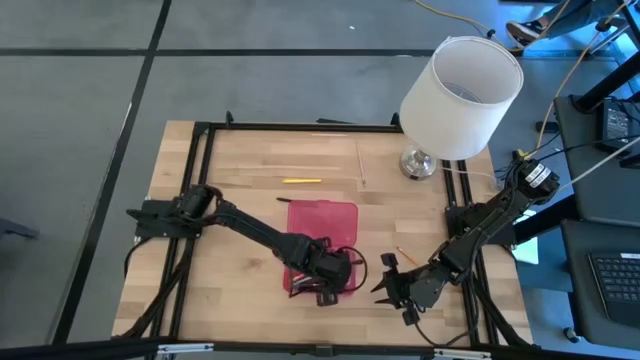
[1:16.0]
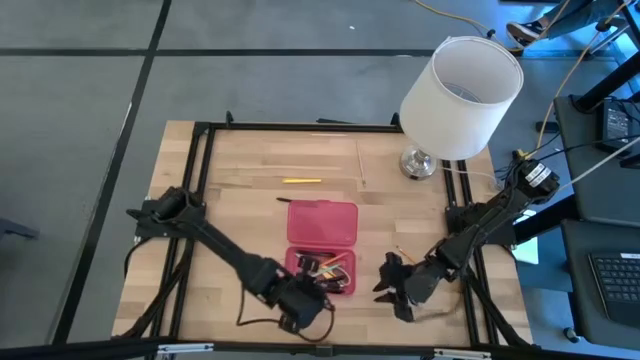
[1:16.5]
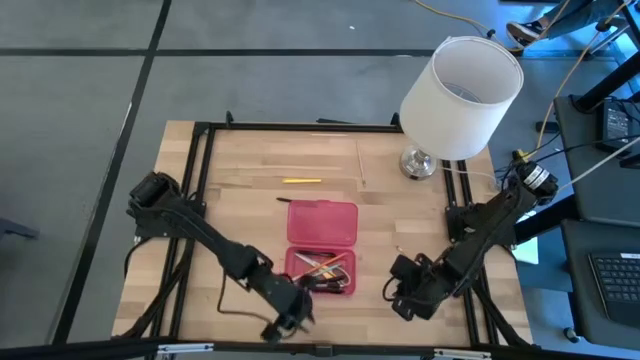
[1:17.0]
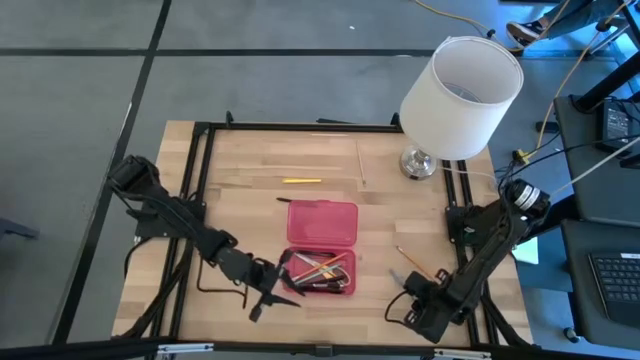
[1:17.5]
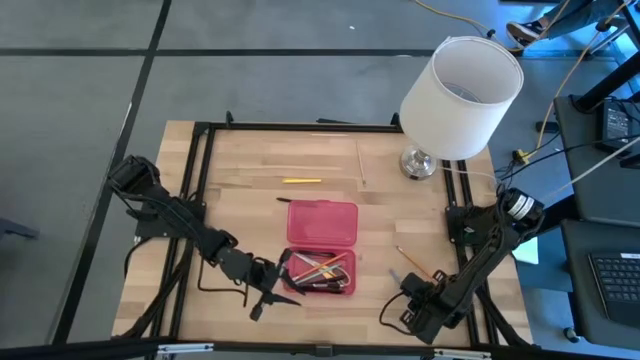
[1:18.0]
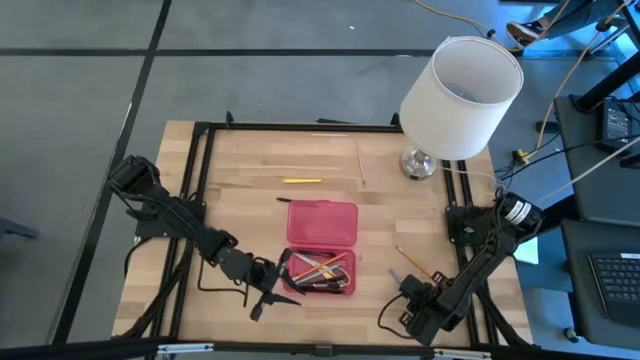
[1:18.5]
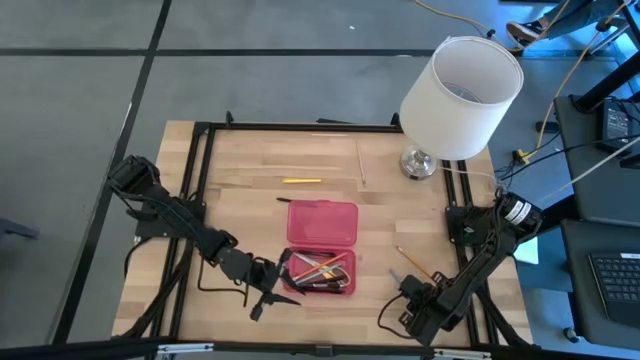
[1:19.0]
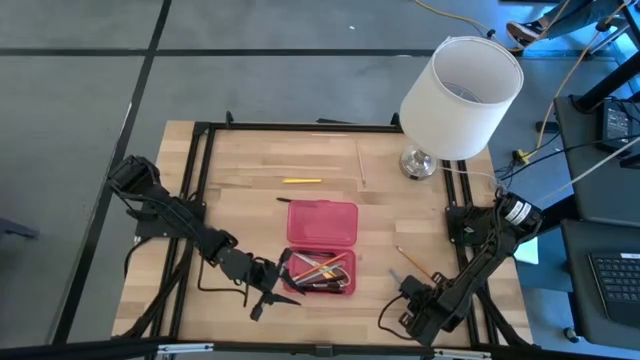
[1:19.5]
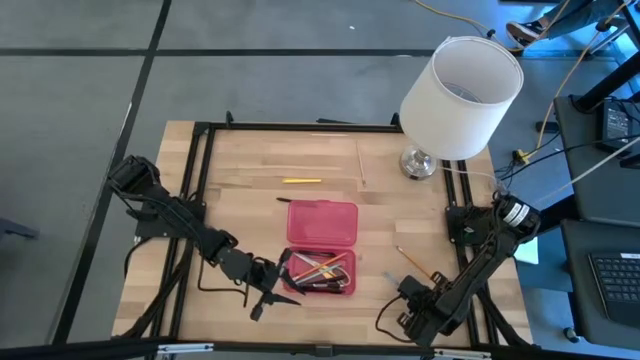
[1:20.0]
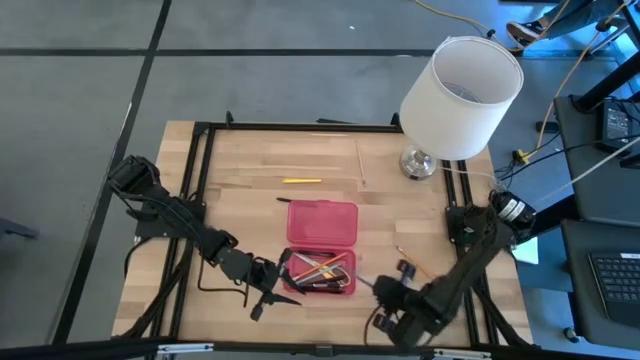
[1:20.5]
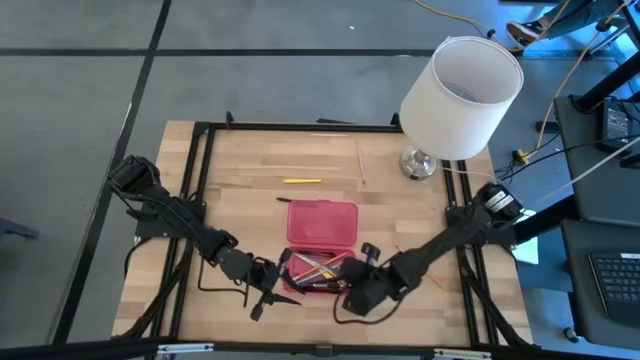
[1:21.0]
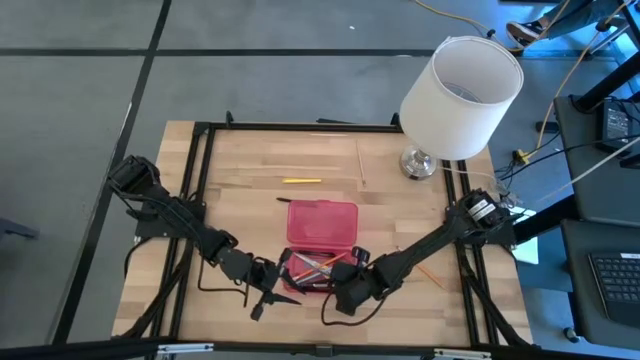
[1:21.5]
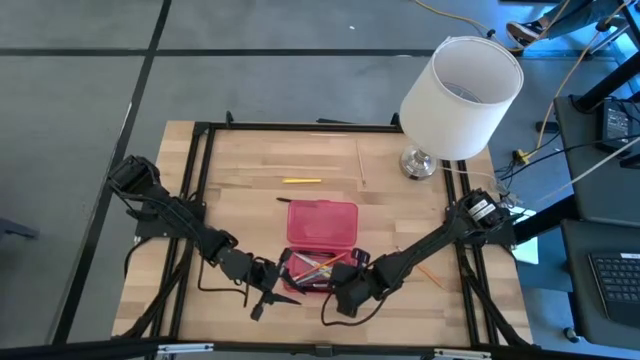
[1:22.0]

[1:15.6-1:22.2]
Task: Pick & place school supplies into a supply box
Put the blue pen into the red supply box

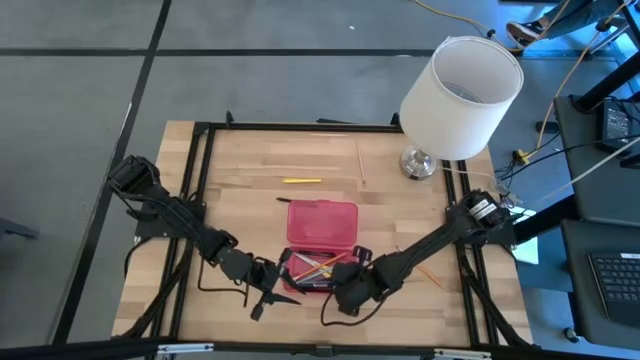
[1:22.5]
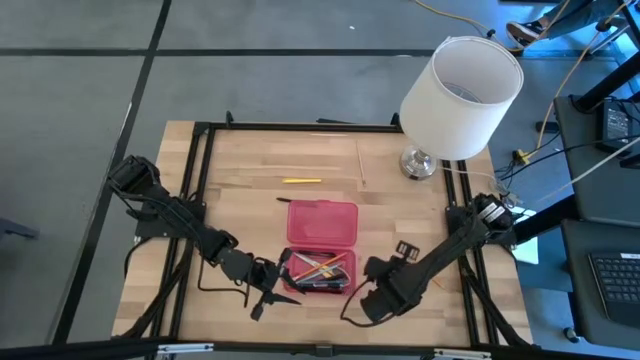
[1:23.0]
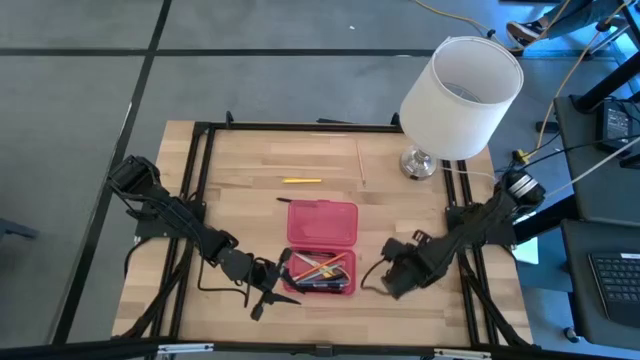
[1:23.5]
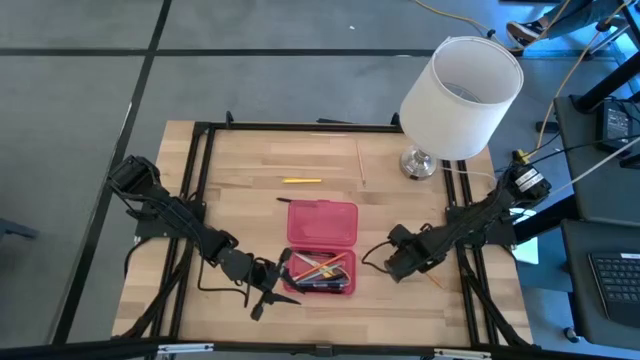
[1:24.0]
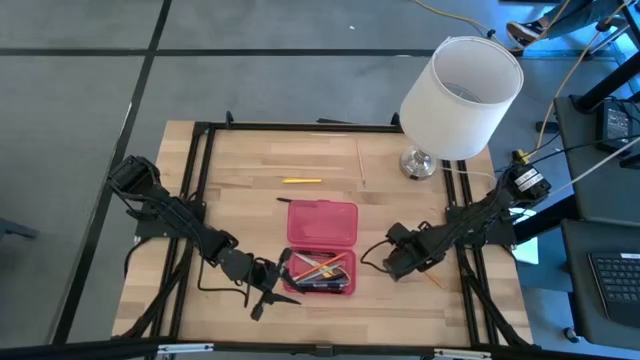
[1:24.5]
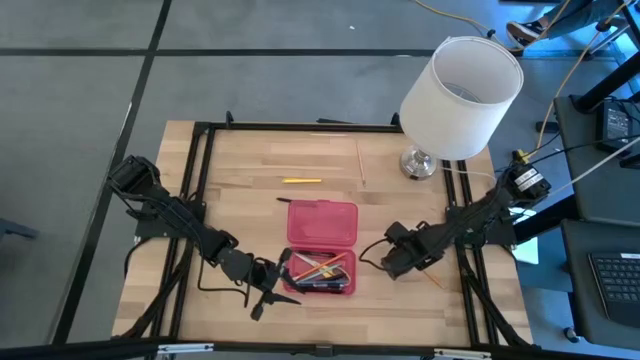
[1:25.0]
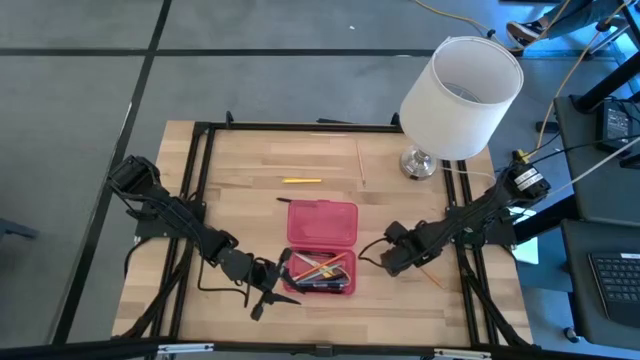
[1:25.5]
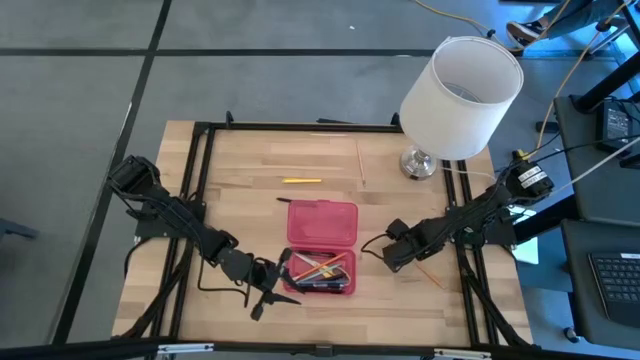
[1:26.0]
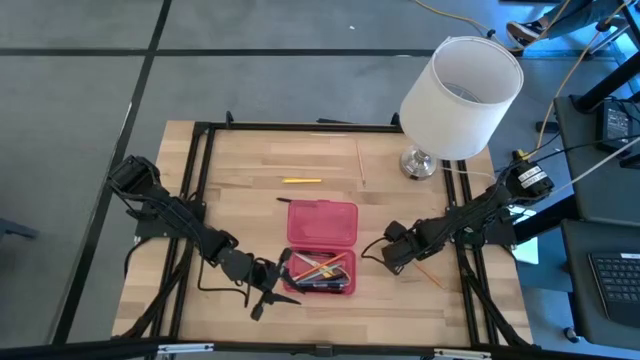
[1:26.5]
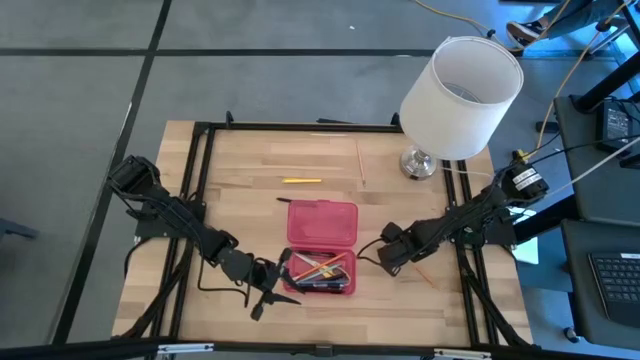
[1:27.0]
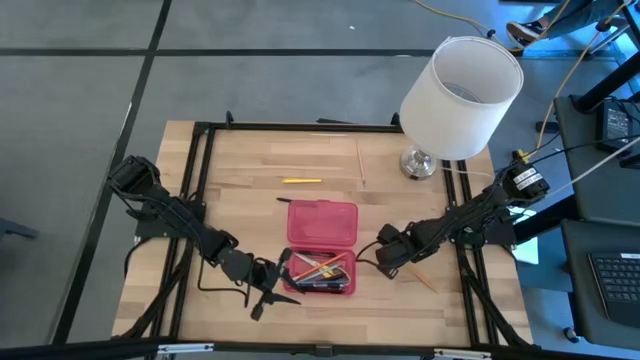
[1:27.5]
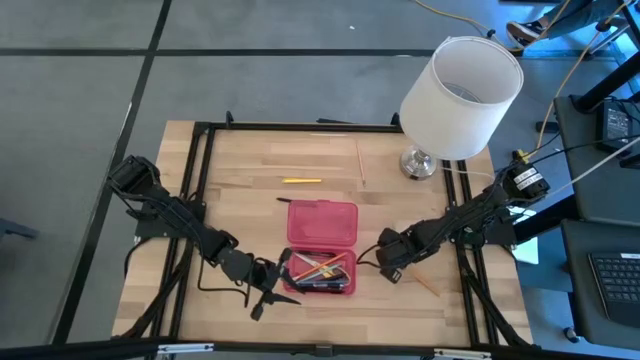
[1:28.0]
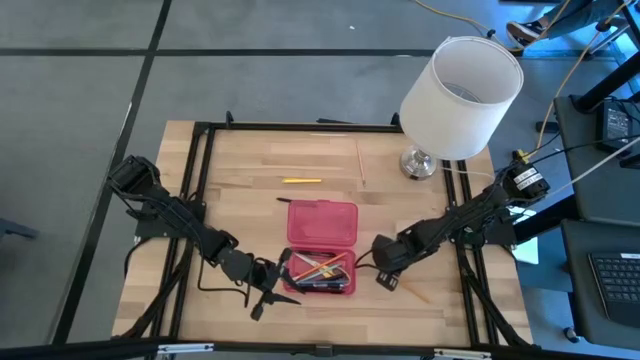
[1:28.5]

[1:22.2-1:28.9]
Put the orange pencil into the red supply box

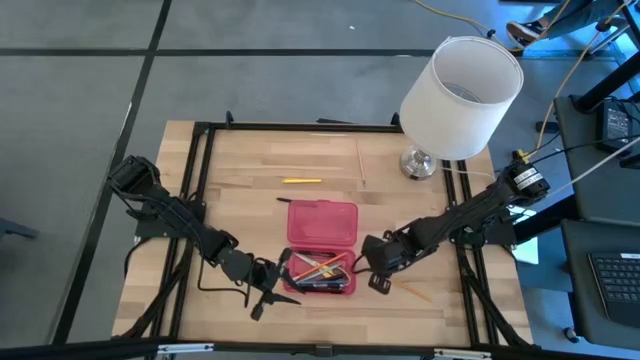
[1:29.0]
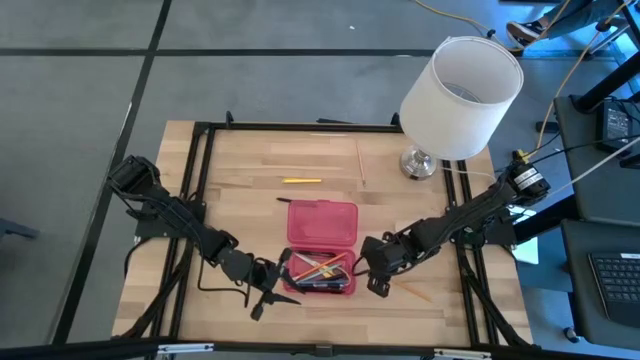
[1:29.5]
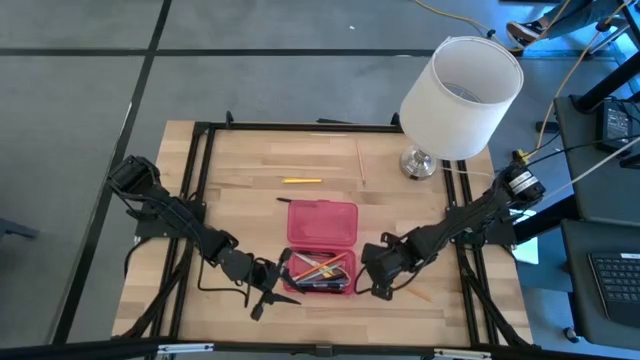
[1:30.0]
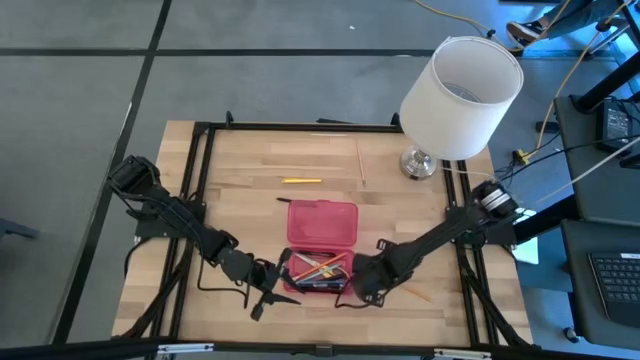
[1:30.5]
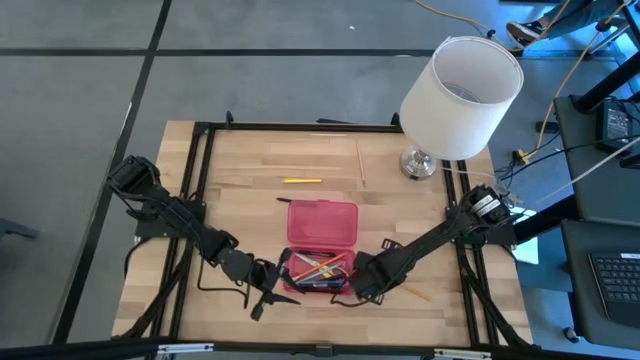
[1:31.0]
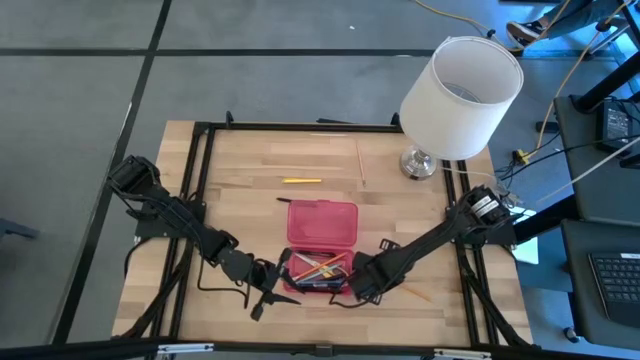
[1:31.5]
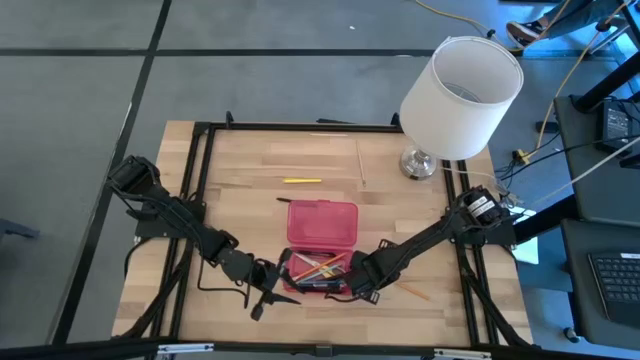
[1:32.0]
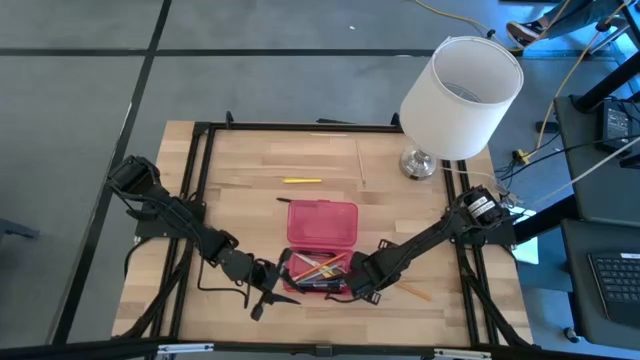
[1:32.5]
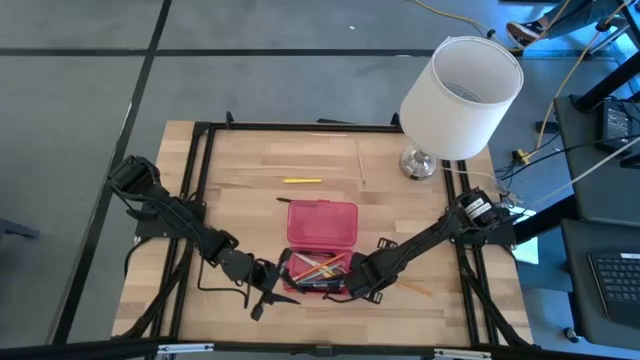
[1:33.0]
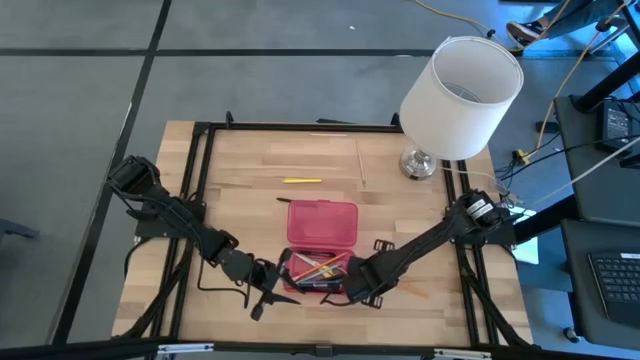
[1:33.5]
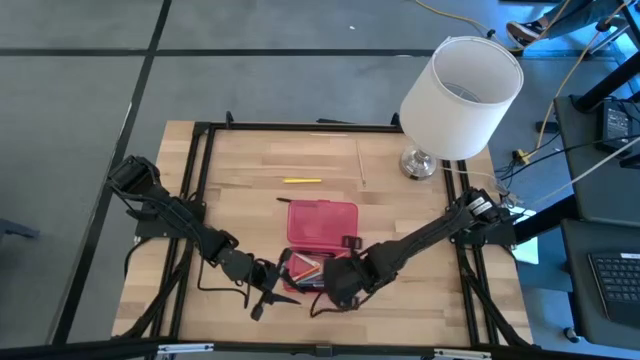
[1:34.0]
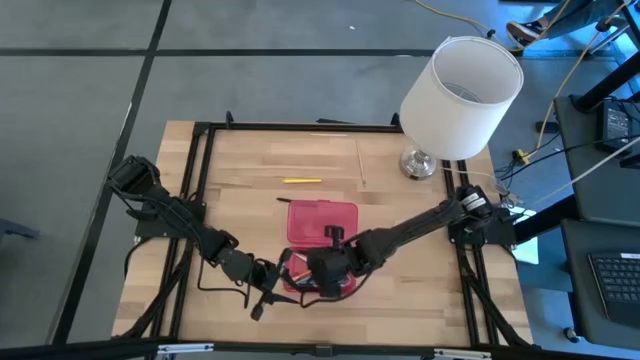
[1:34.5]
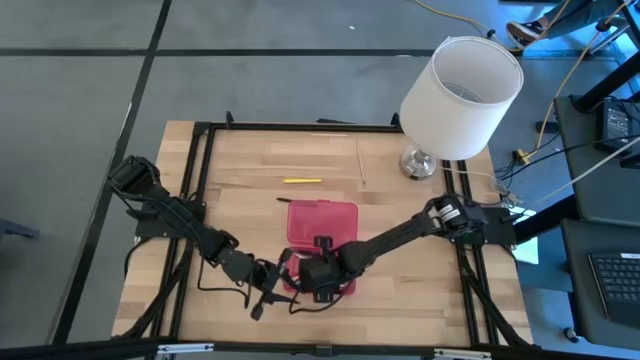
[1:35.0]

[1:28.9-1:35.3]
Put the orange pencil into the red supply box

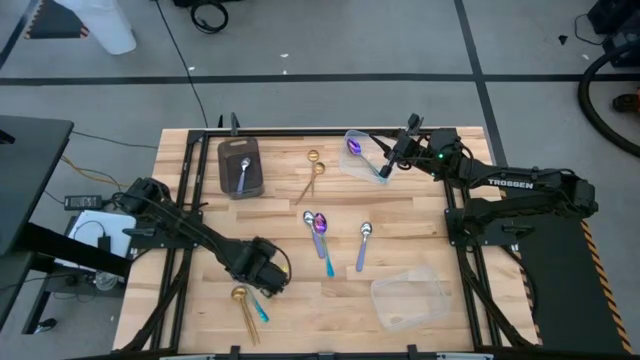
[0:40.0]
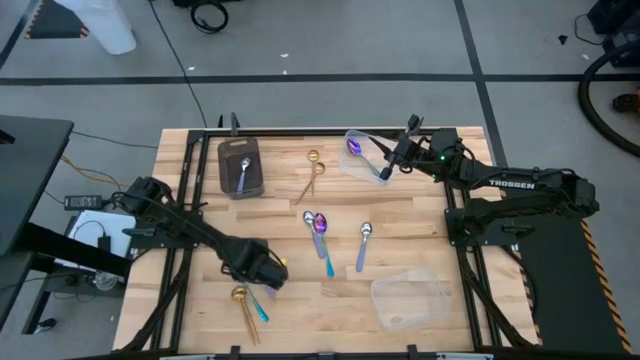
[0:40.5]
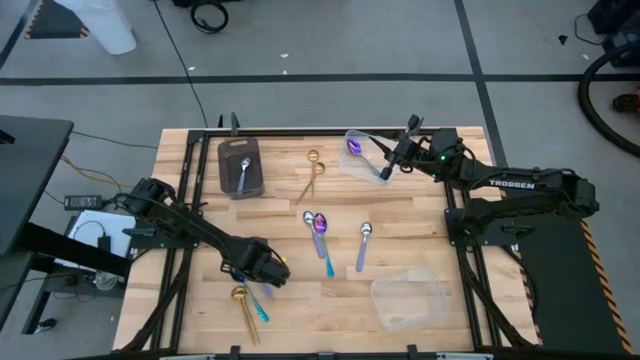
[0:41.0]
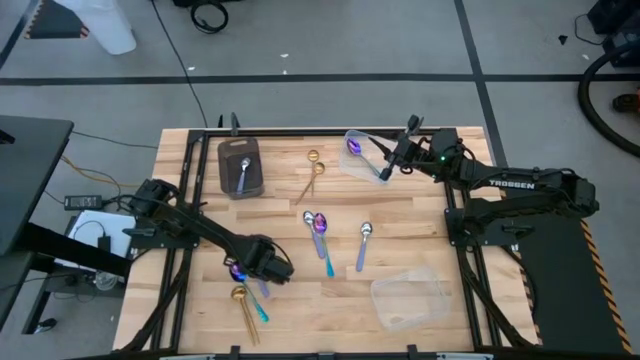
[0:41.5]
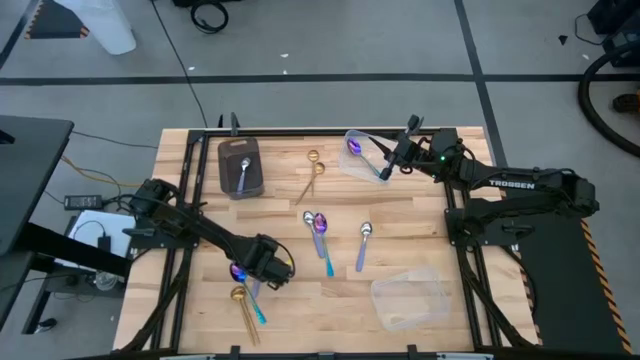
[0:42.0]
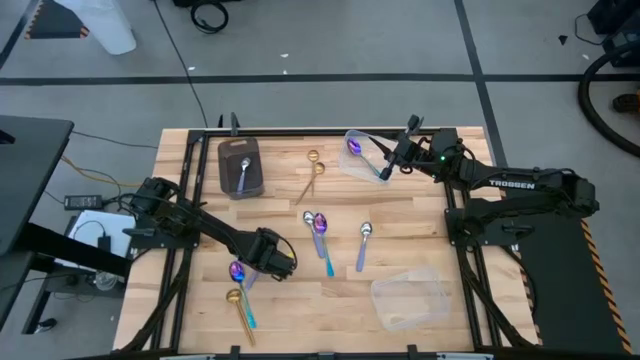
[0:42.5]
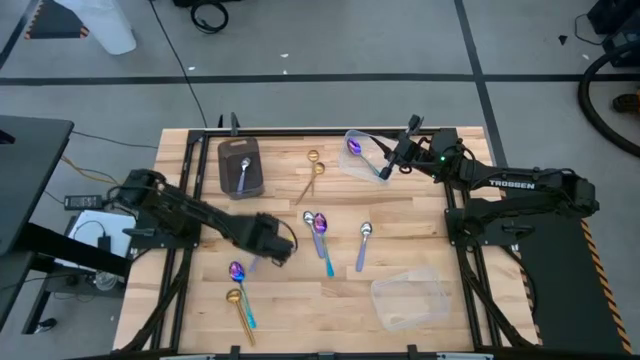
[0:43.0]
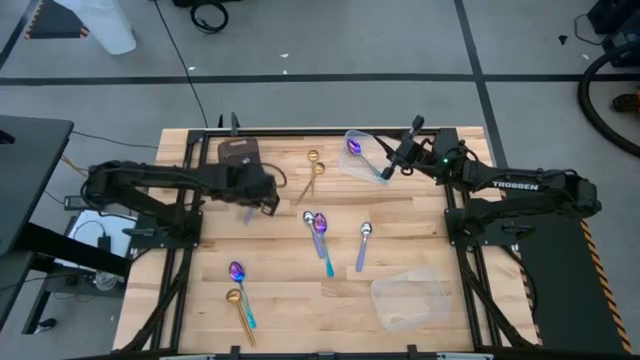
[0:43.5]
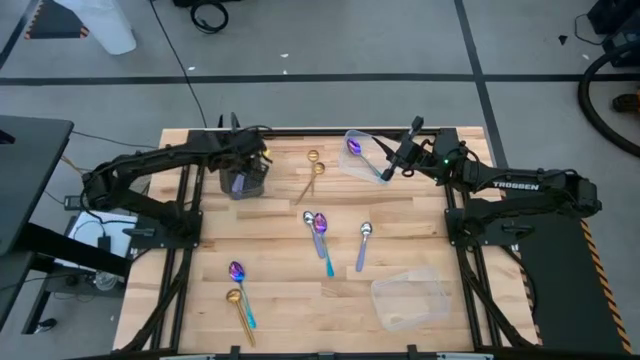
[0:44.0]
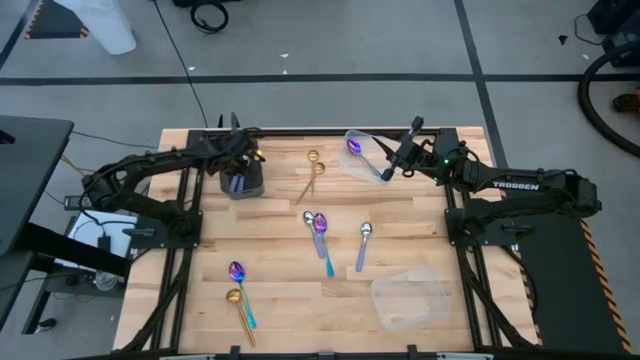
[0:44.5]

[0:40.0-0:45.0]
Task: Sort silverware by color (type)
Put the purple spoon into the black bin
